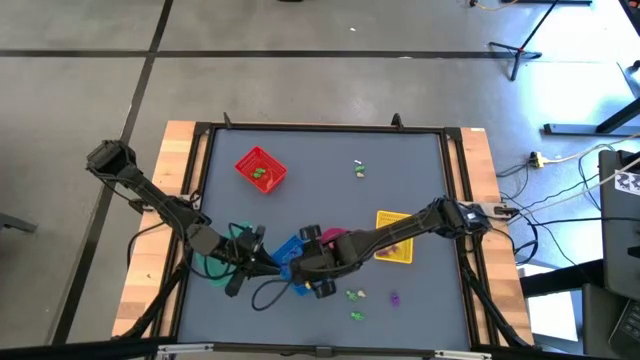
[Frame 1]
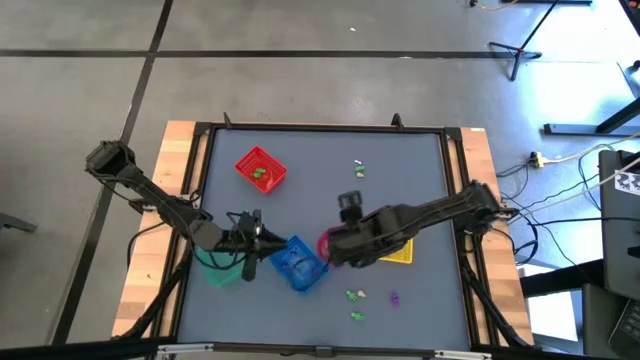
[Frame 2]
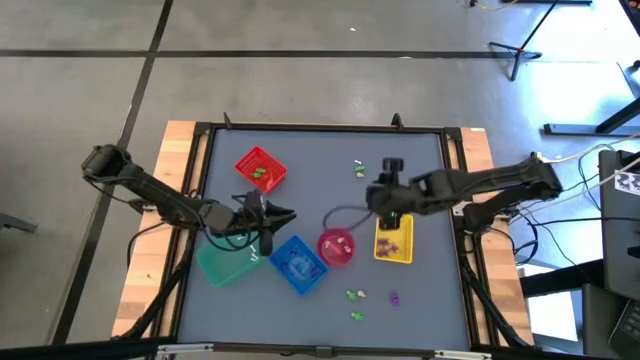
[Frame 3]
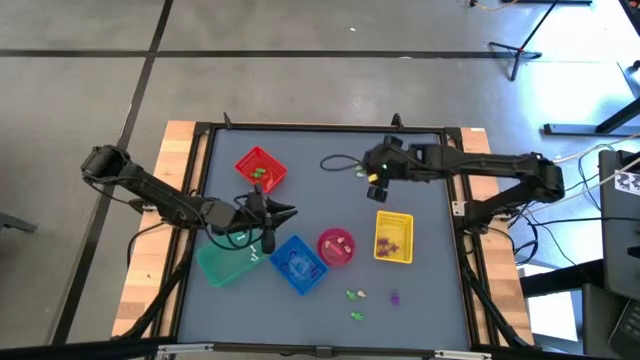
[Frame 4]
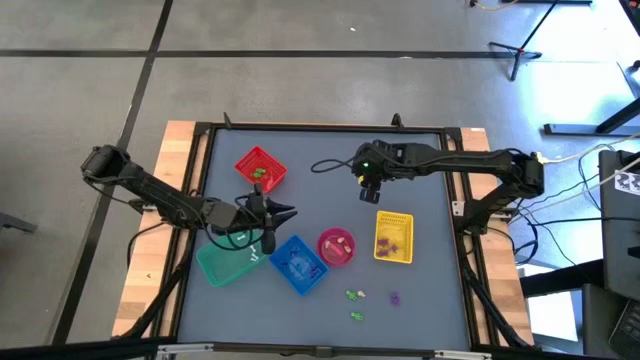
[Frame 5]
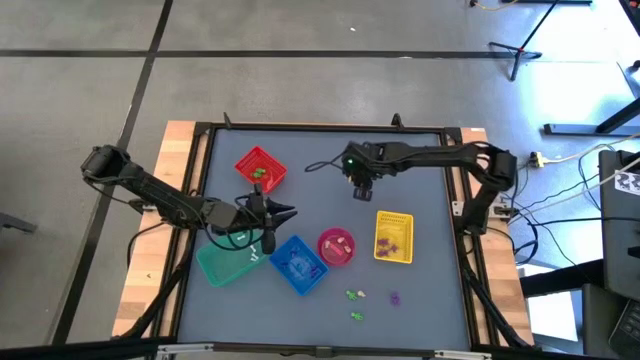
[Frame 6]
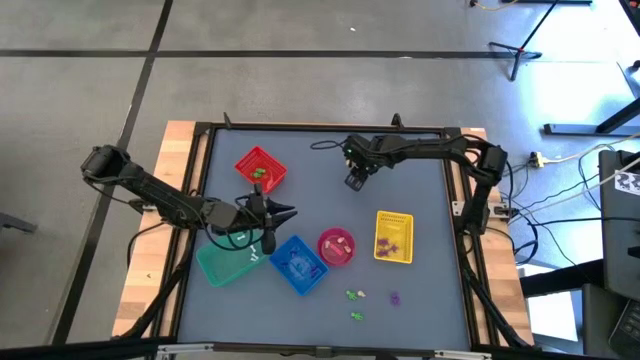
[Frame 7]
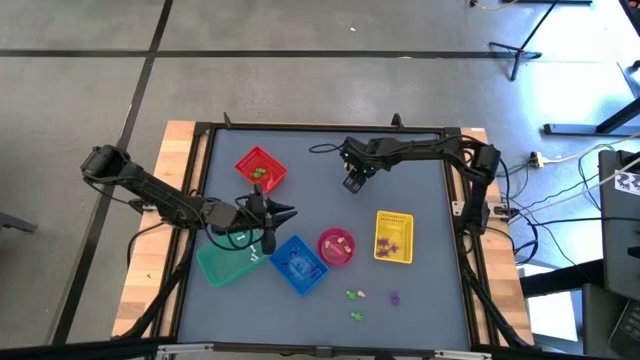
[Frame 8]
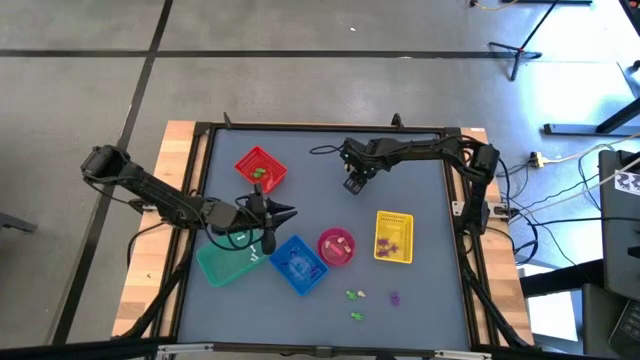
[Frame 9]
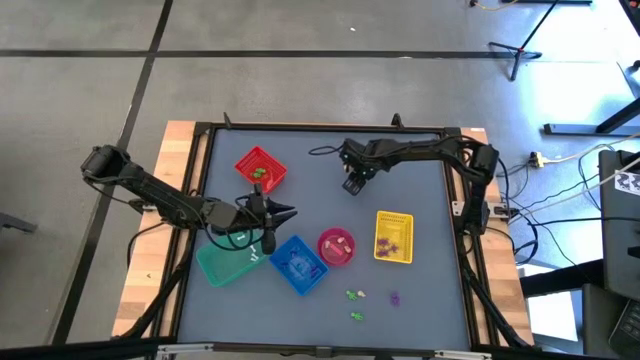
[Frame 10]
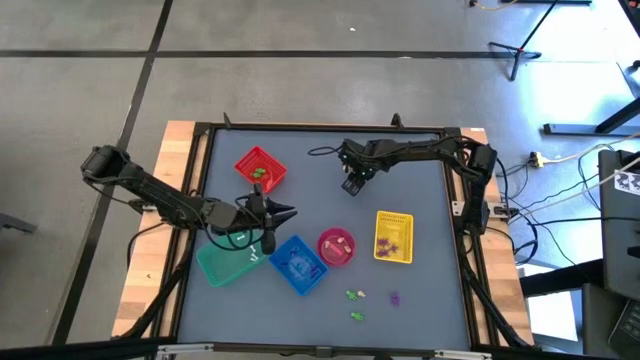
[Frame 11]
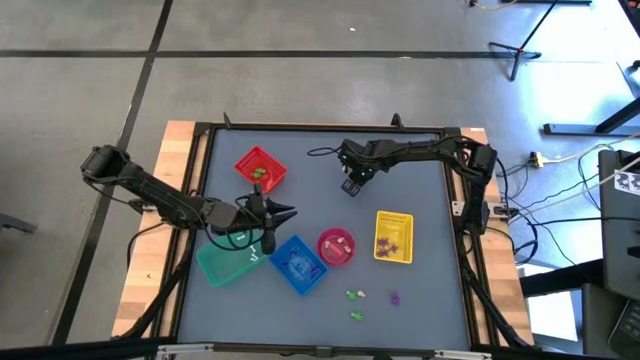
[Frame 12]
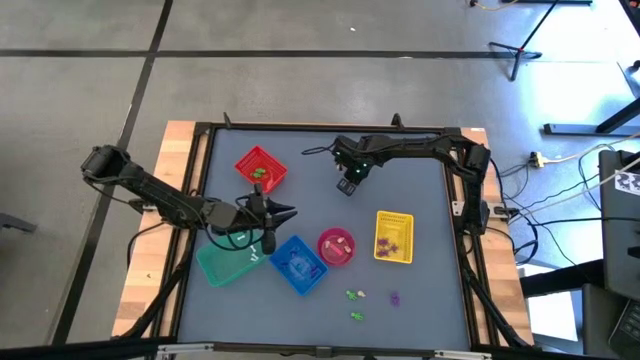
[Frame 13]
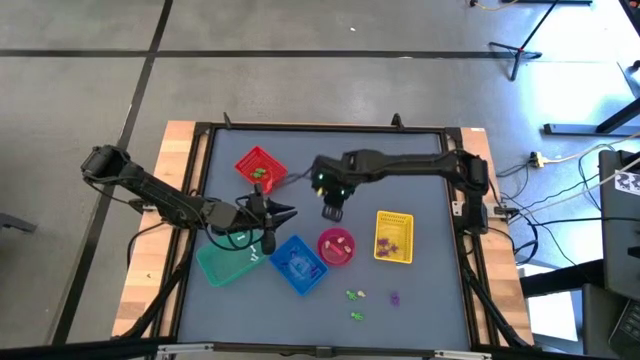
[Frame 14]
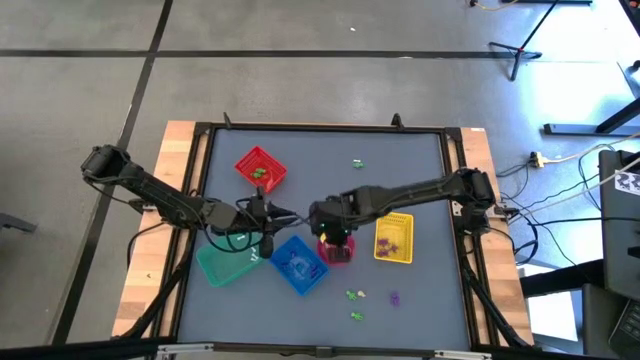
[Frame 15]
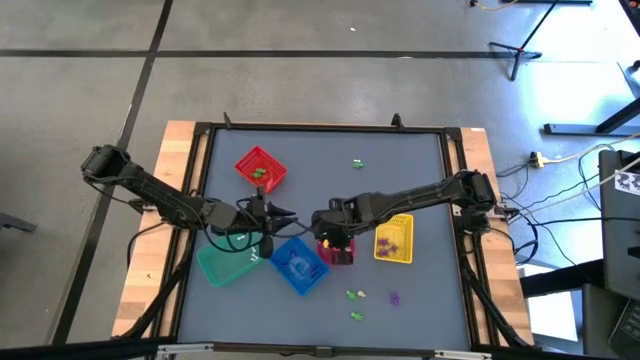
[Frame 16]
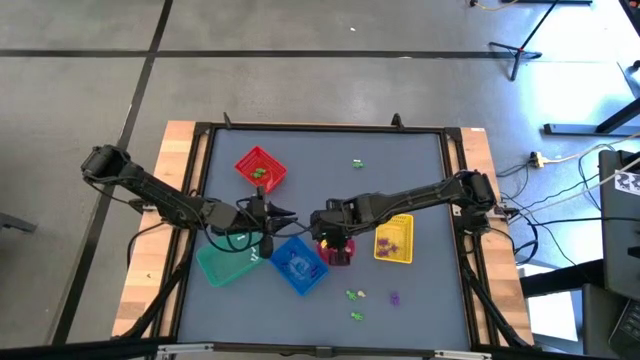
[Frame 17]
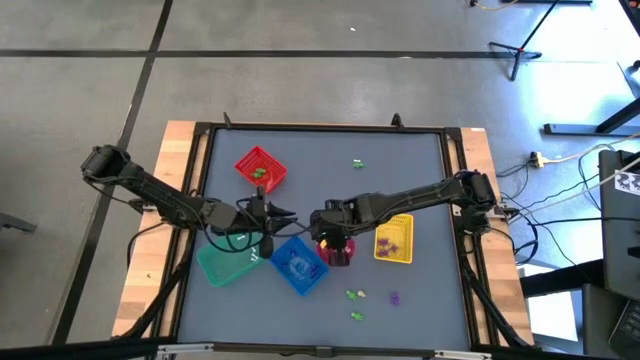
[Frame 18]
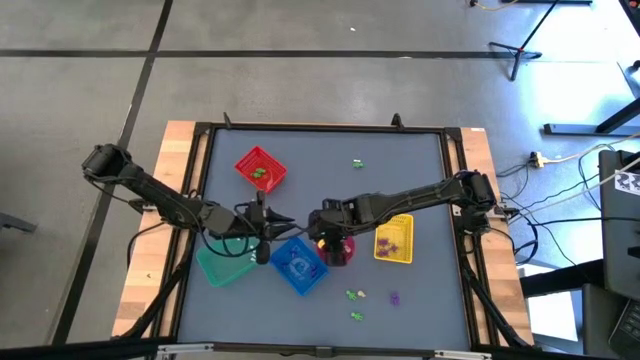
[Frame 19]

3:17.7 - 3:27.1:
Task: Sort Halloween decoration
Put the white skull toy into the pink bin

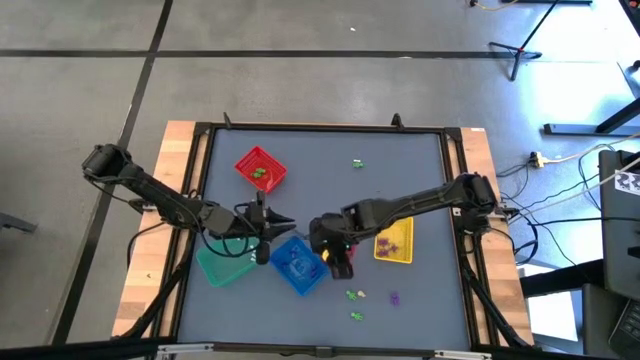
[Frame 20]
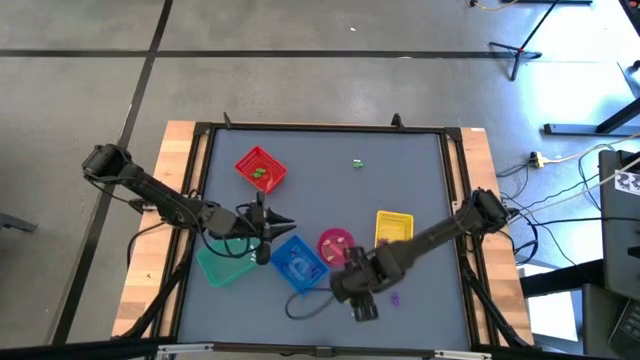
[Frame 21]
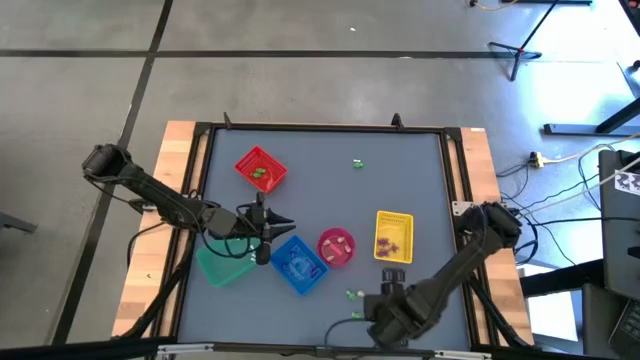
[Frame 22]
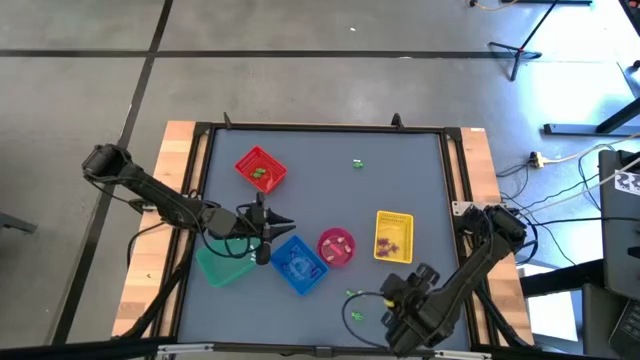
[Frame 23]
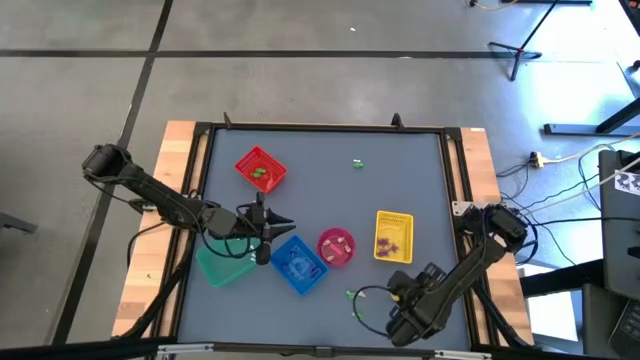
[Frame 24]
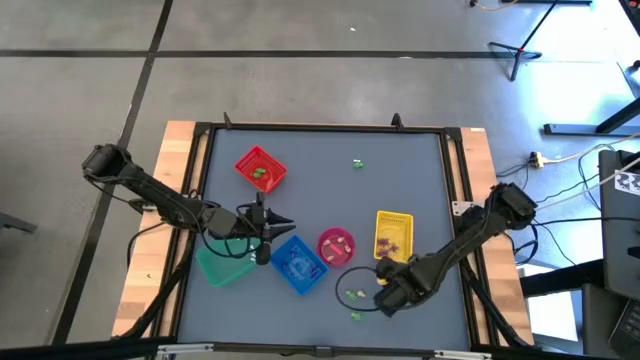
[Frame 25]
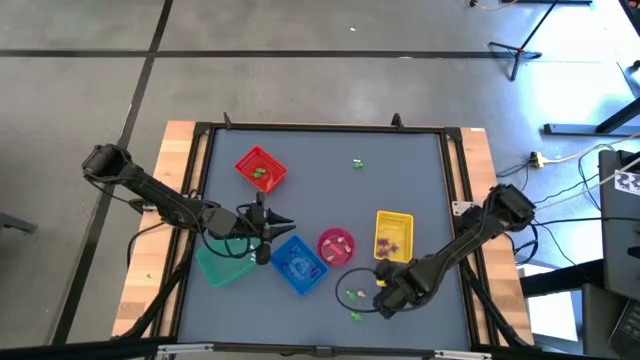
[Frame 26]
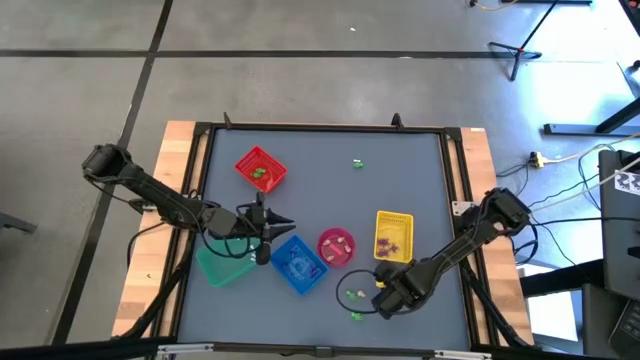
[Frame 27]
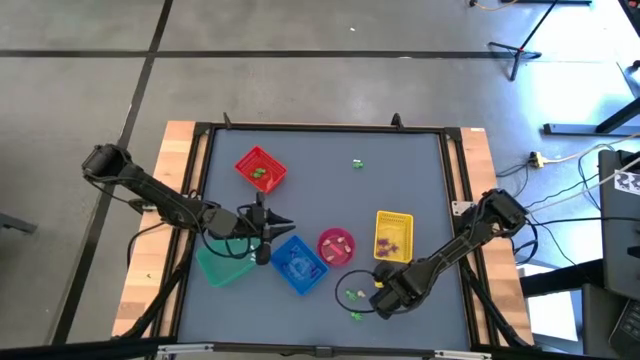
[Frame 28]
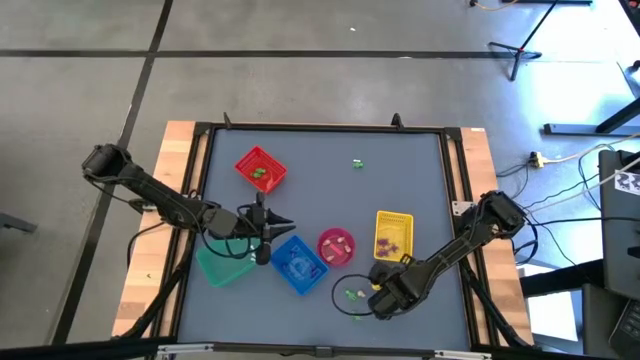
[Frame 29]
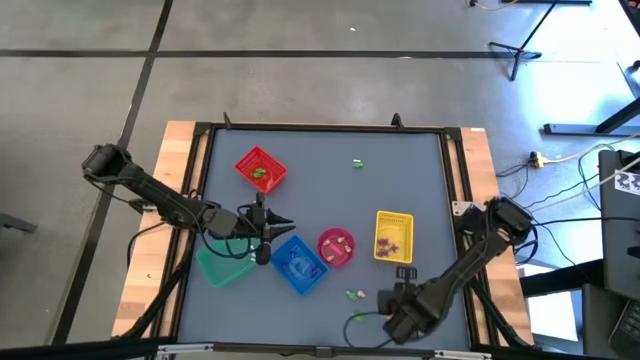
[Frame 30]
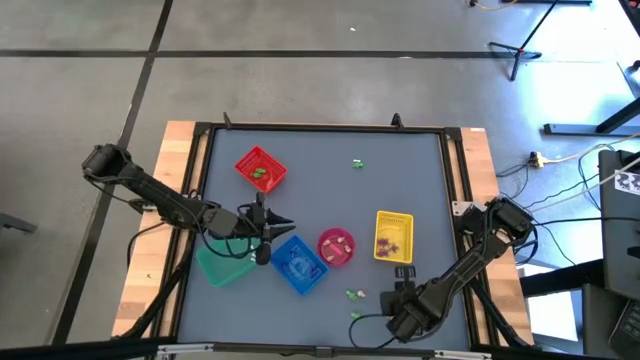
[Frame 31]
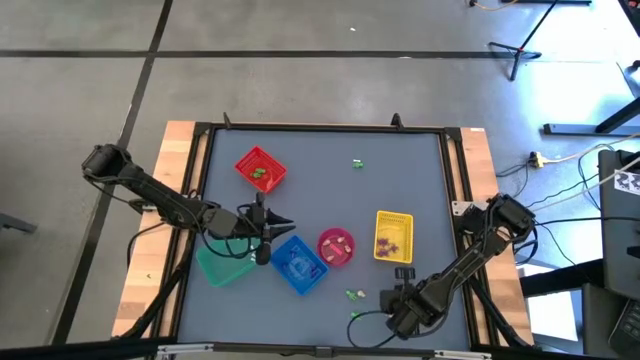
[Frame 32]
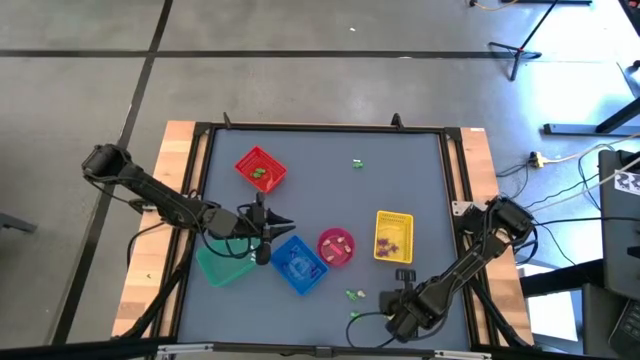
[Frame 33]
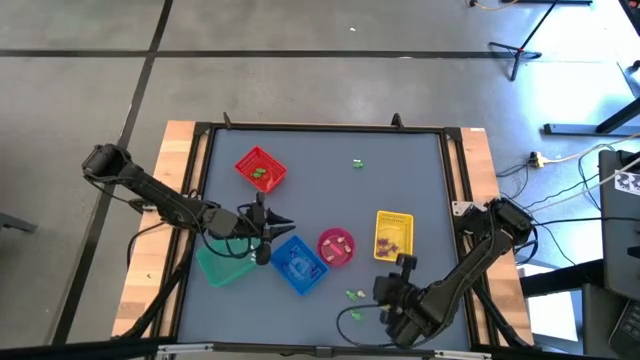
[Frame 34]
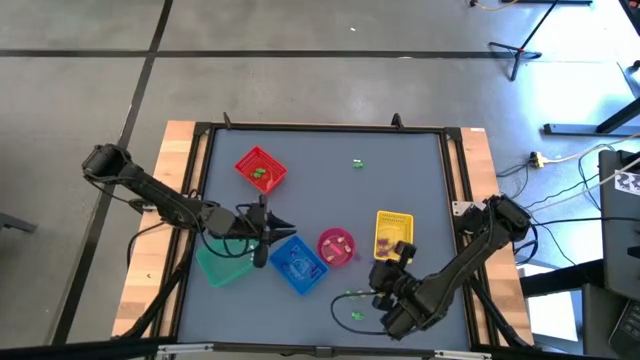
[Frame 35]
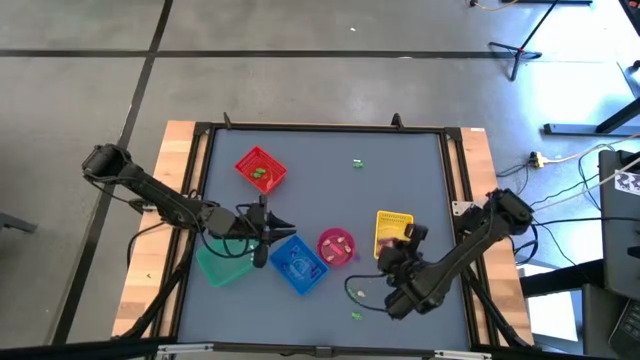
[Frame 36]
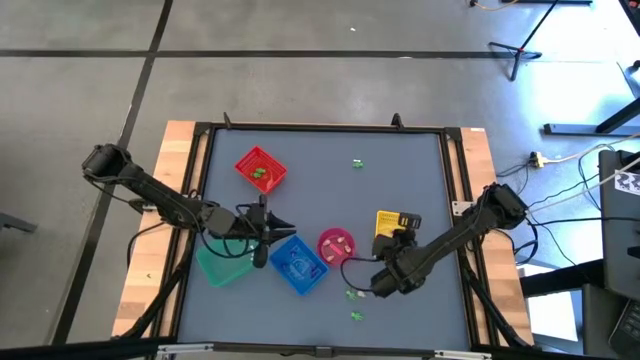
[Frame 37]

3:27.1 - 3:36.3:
Put the violet spider toy into the yellow bin

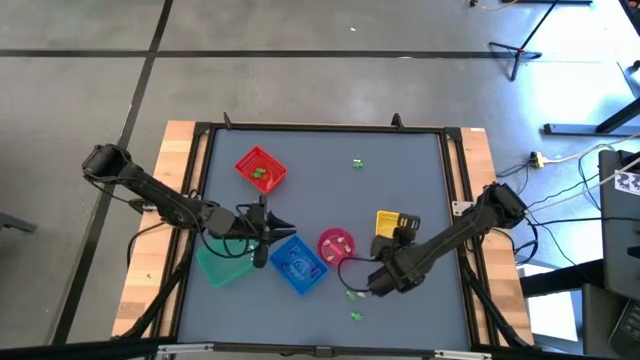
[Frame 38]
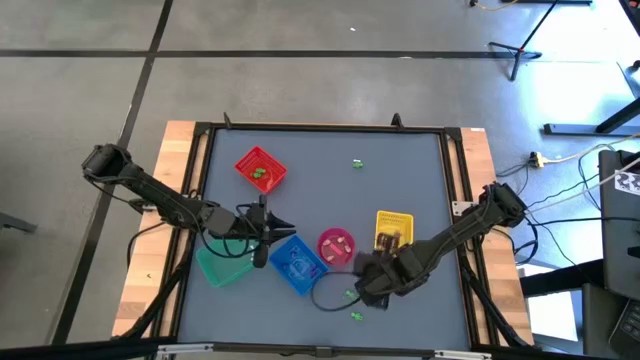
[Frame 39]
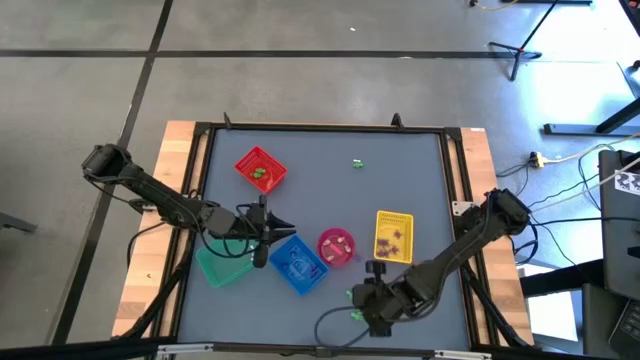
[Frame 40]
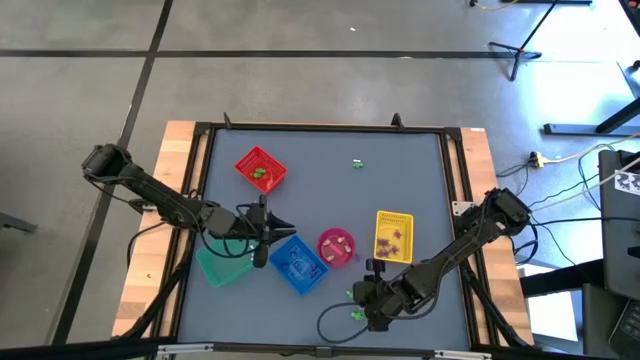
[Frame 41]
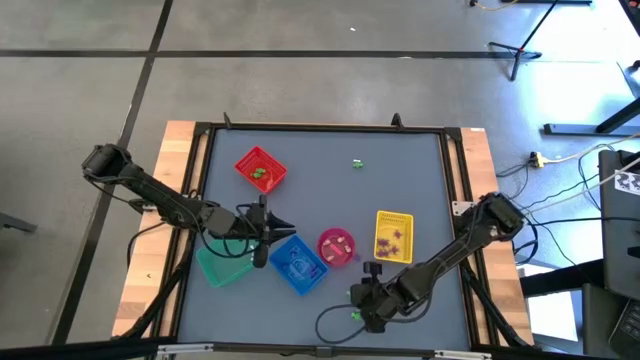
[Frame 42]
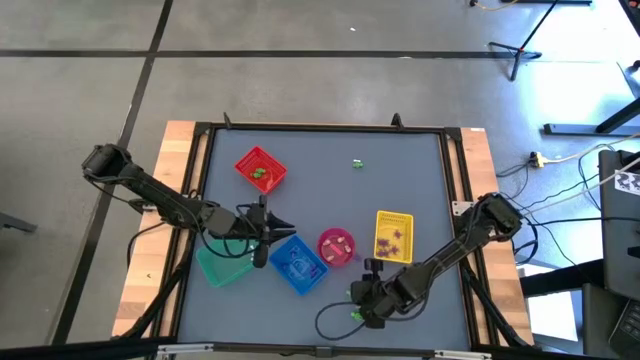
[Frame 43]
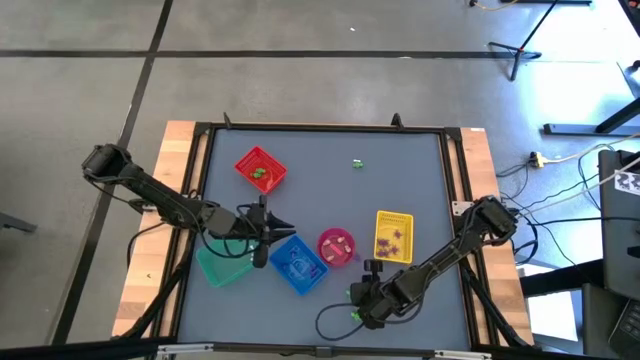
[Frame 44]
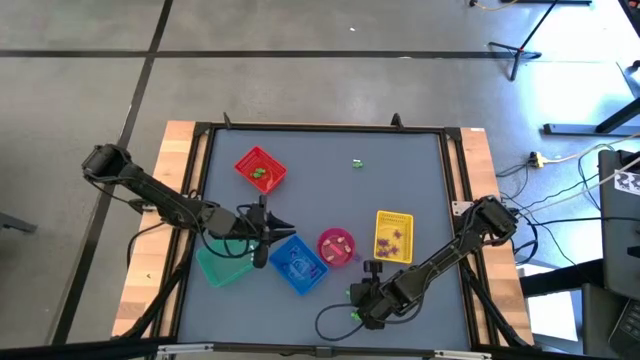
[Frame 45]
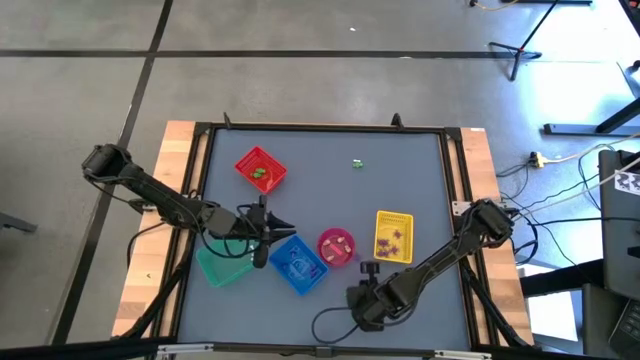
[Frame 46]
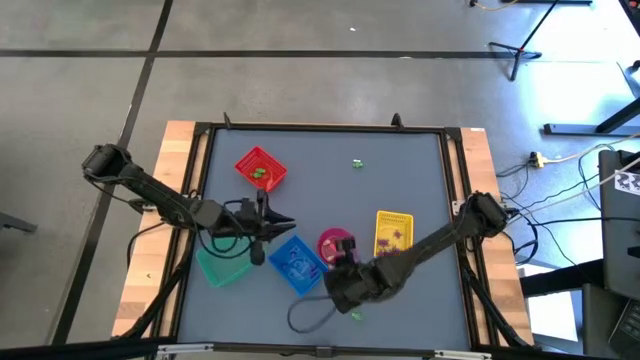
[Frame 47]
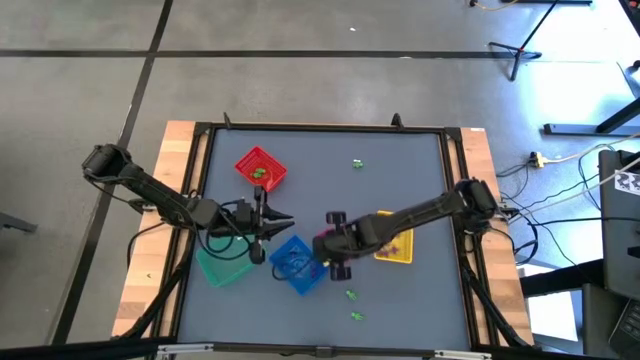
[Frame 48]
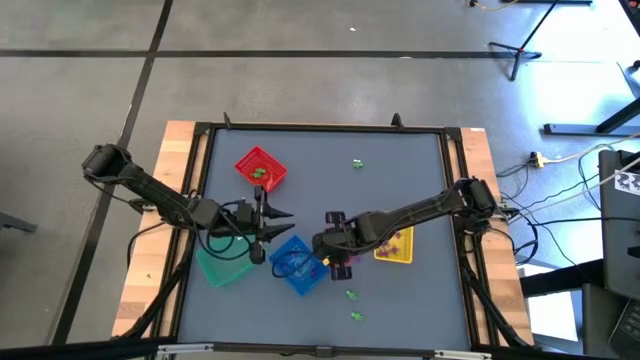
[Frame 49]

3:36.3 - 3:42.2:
Put the white skull toy into the pink bin
